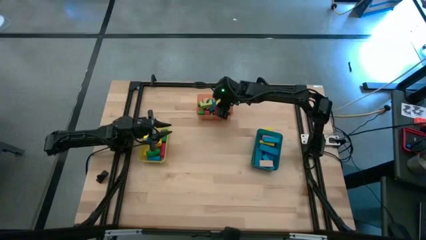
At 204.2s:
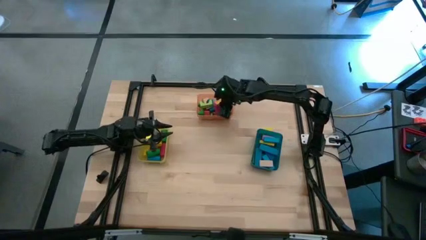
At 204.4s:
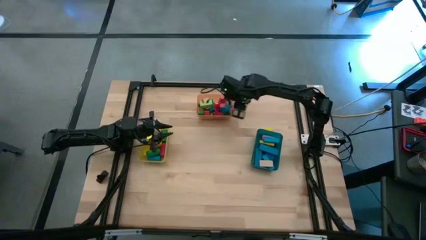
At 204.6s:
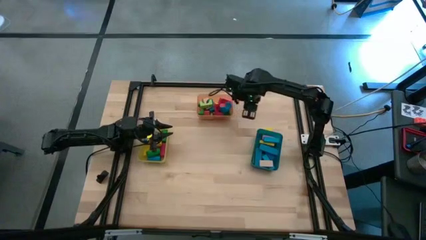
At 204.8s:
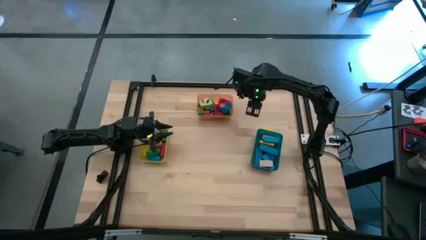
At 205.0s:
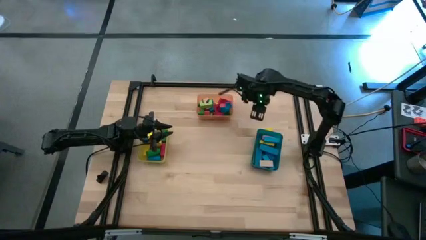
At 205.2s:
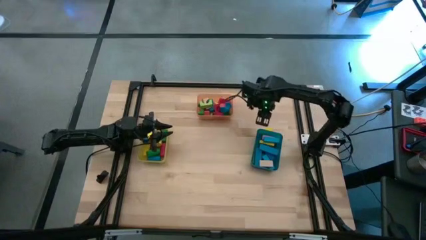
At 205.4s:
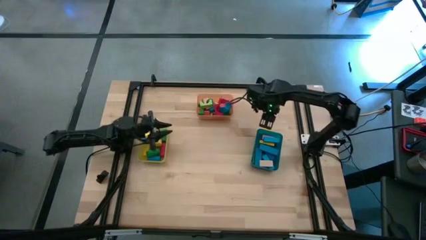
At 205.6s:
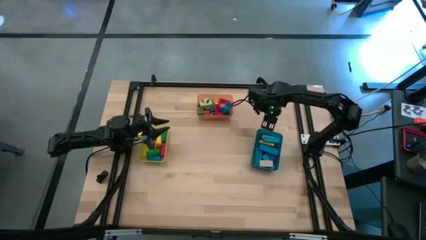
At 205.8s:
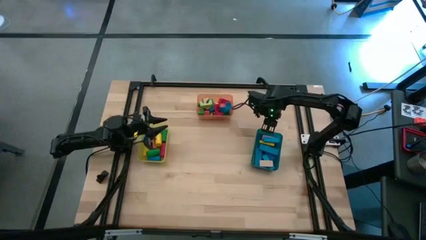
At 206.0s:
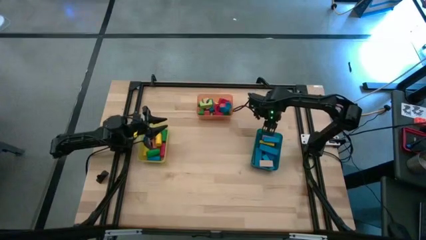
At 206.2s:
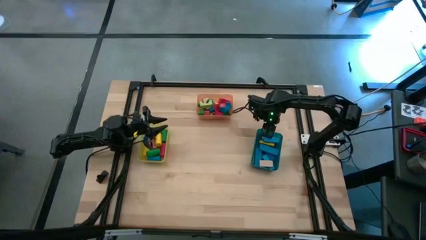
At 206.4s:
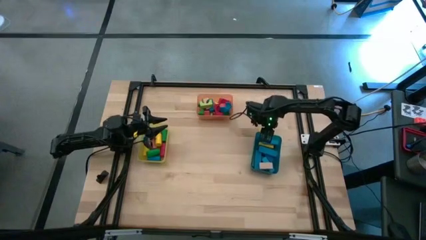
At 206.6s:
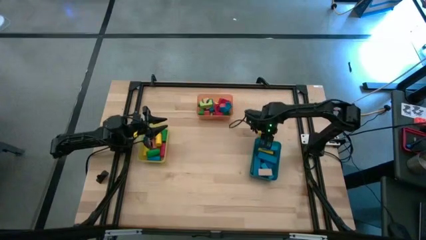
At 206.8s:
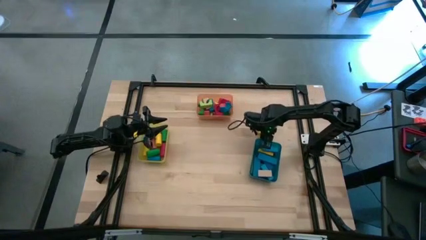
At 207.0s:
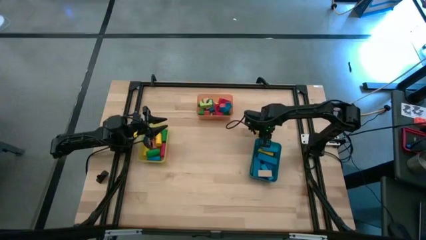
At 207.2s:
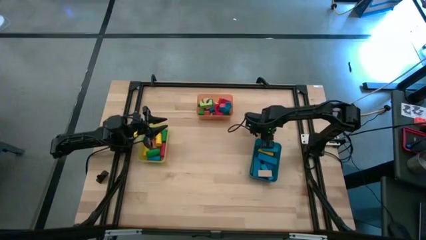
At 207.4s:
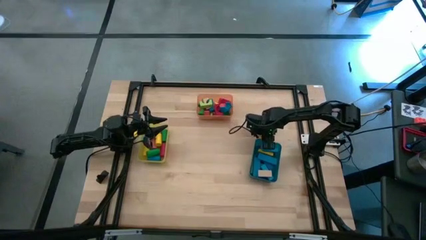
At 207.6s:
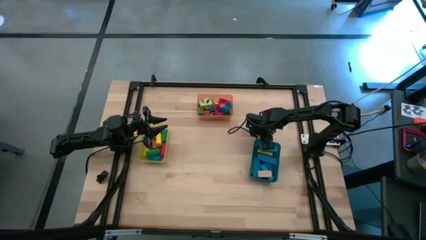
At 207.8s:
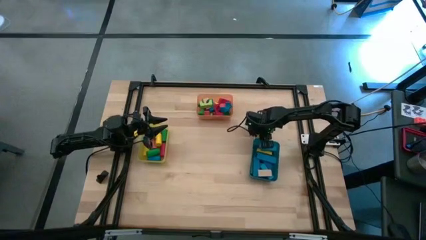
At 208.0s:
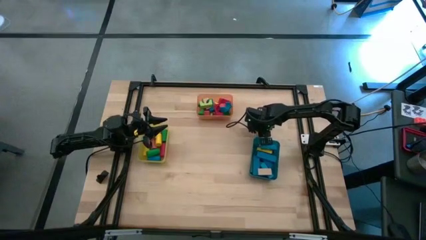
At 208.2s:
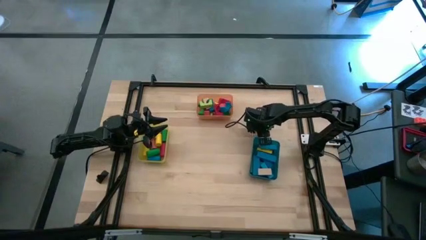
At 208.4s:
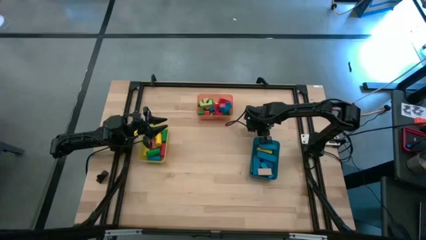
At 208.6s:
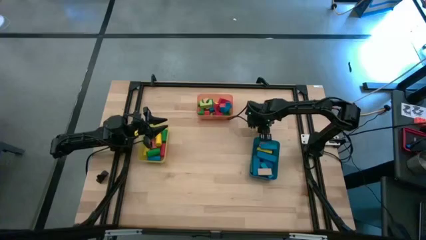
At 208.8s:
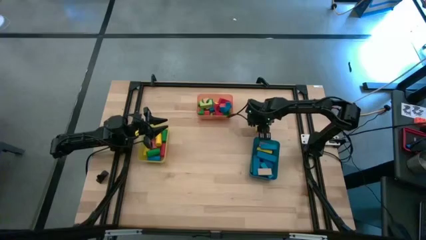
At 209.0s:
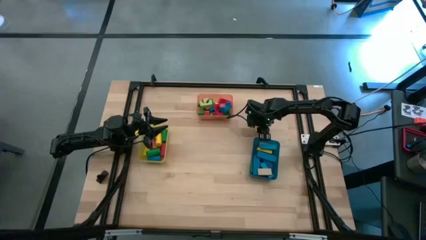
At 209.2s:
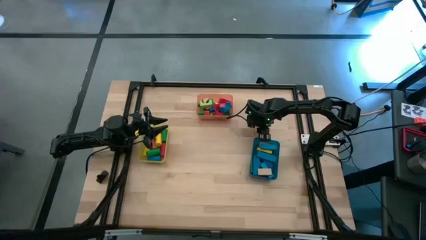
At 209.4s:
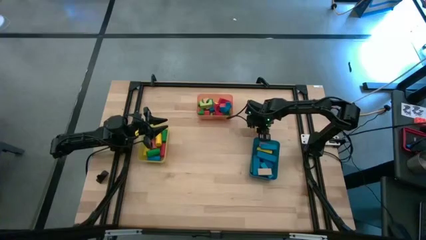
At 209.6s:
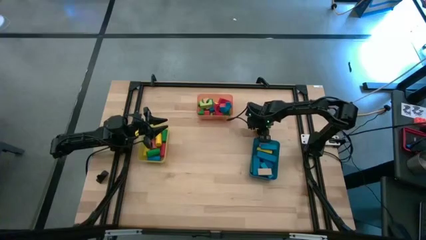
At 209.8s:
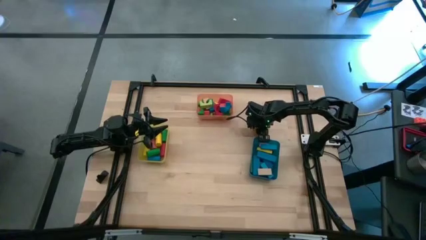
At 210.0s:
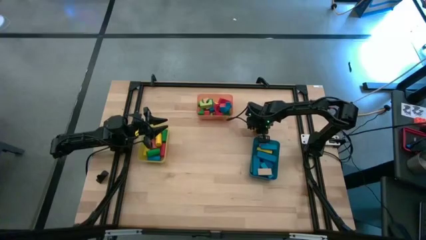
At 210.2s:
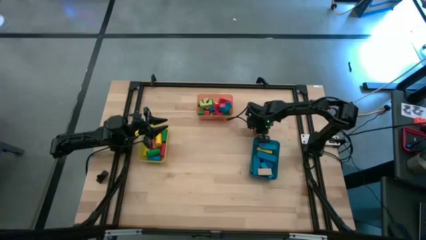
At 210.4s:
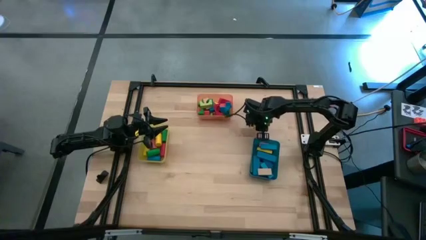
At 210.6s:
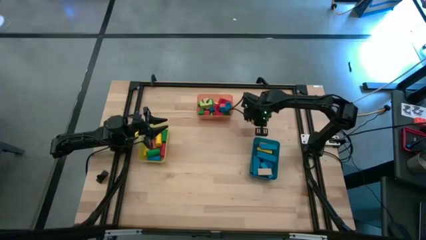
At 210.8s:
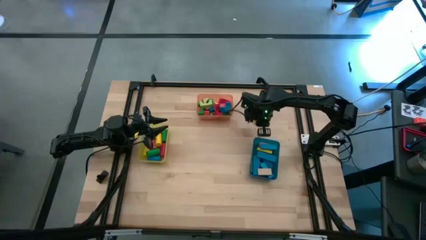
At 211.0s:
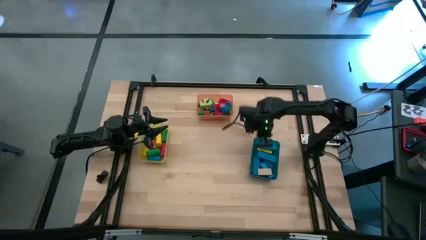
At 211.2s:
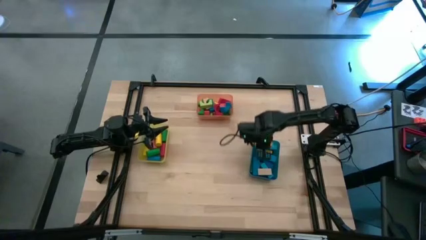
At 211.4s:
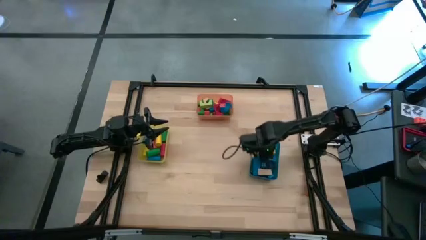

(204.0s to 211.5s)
Task: Sort blocks by size
Put the yellow rectangle block into the blue bin

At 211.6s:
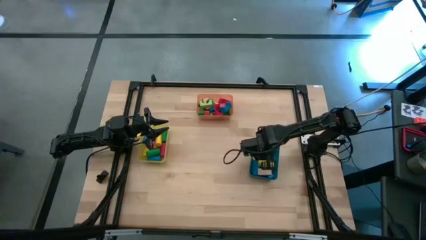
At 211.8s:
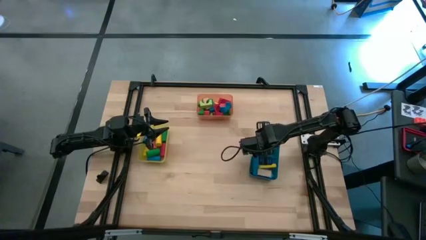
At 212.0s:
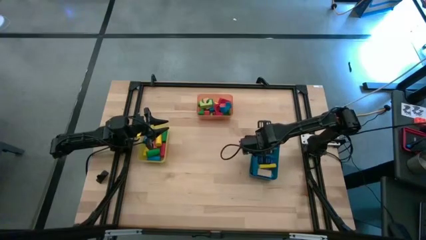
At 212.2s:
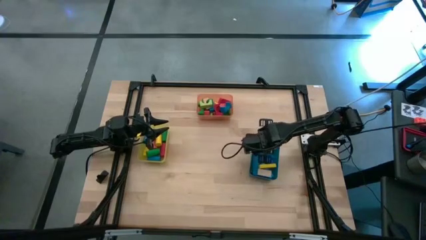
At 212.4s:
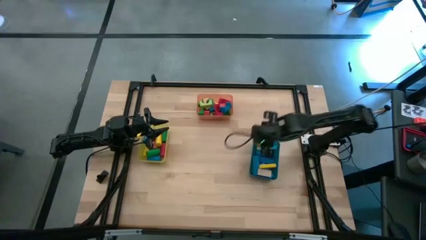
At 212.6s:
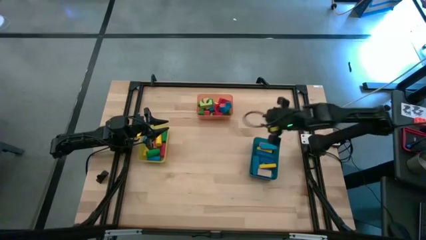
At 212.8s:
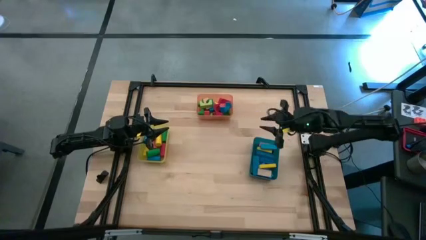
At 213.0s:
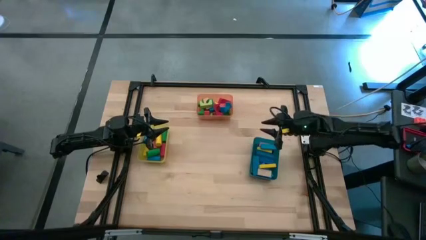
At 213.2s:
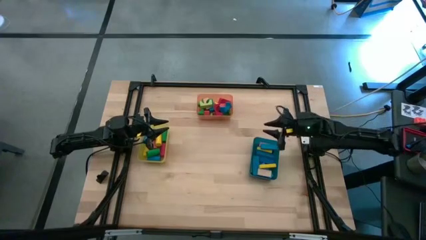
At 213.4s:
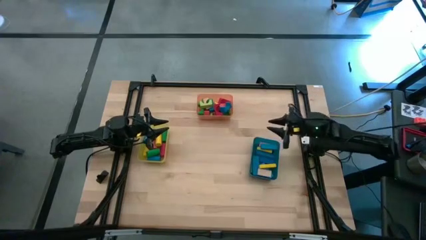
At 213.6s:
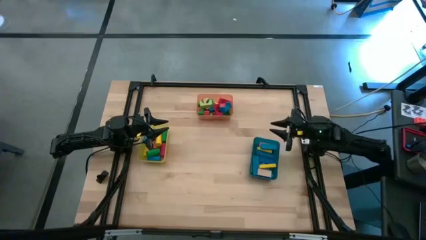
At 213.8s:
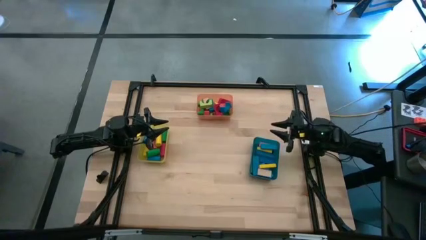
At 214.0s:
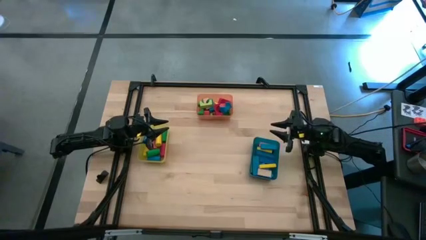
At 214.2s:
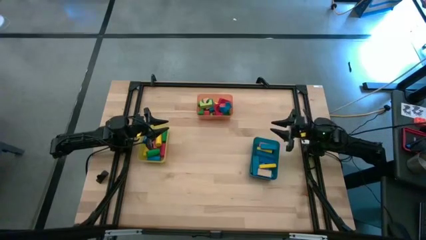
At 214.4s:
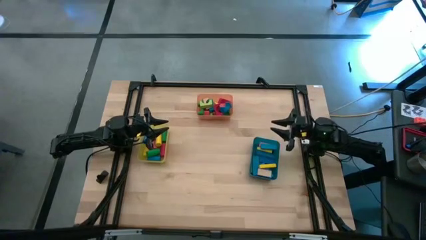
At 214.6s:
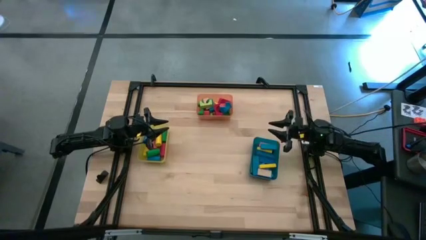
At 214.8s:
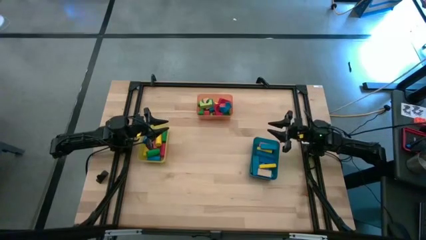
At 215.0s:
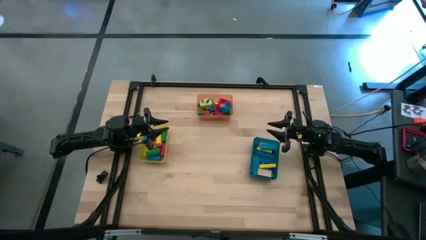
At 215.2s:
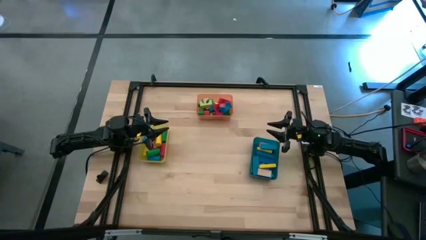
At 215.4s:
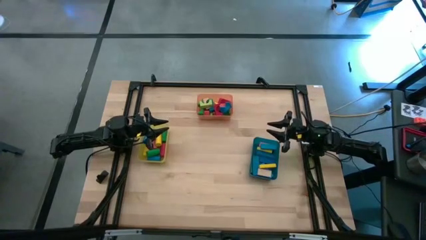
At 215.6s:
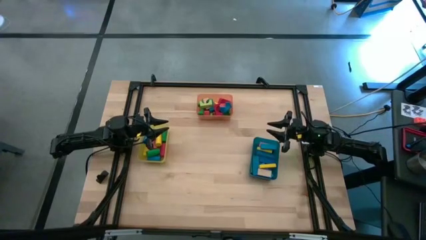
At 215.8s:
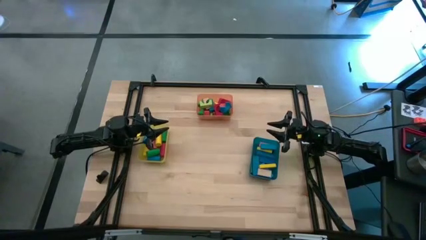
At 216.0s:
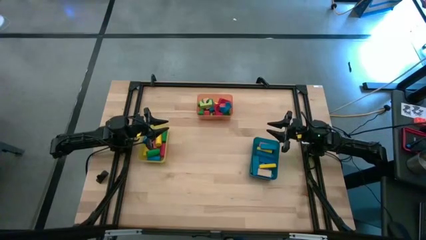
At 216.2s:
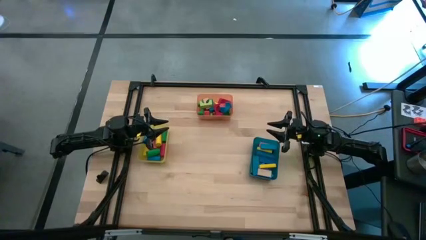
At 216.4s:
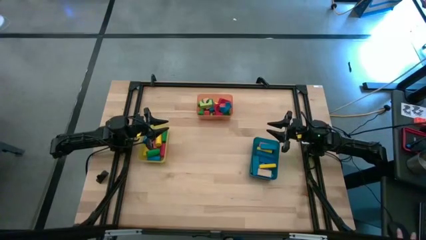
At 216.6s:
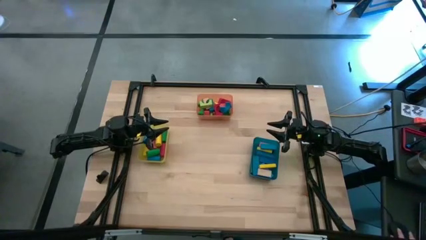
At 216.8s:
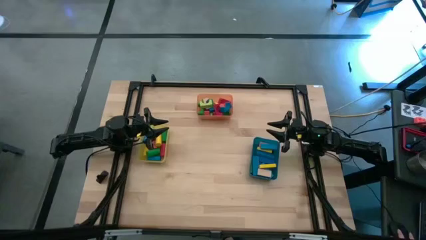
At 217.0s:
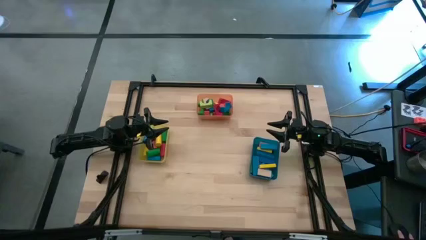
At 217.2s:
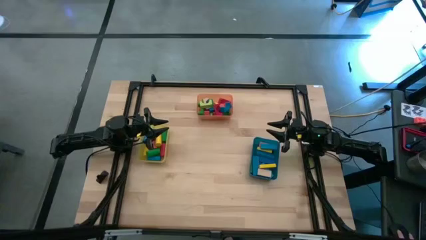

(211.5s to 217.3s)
Return to Home Position

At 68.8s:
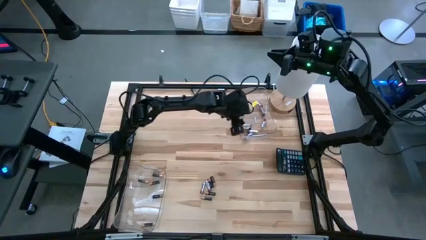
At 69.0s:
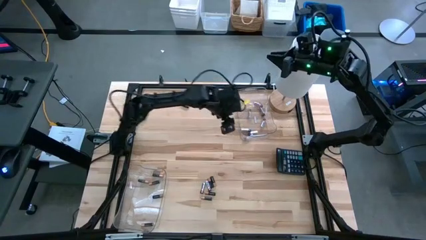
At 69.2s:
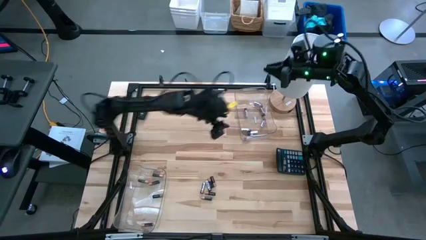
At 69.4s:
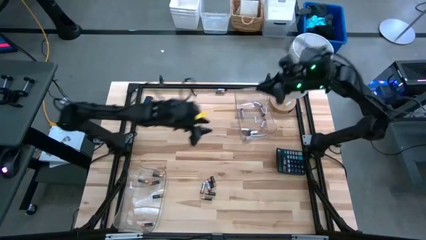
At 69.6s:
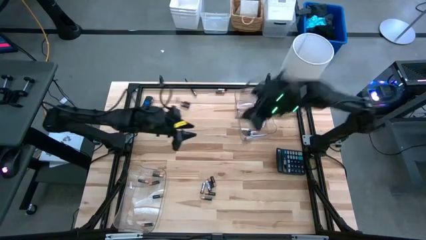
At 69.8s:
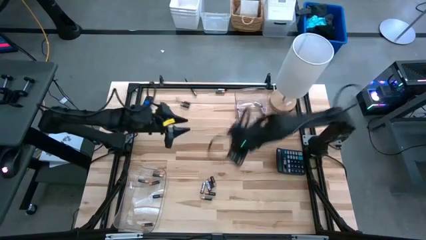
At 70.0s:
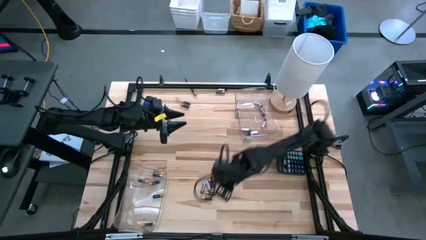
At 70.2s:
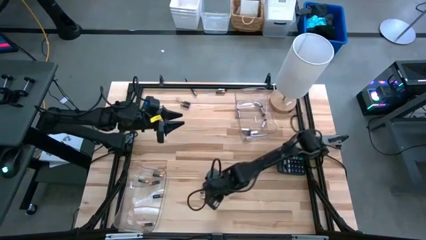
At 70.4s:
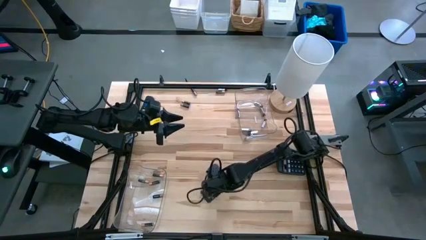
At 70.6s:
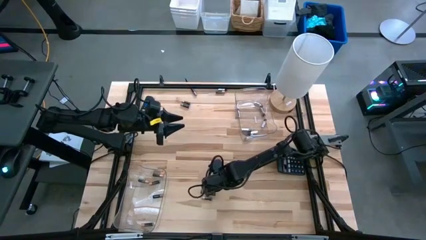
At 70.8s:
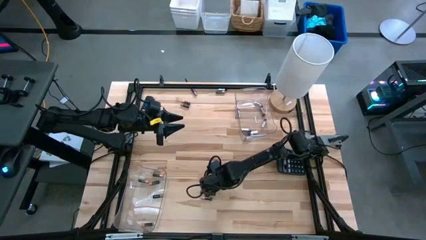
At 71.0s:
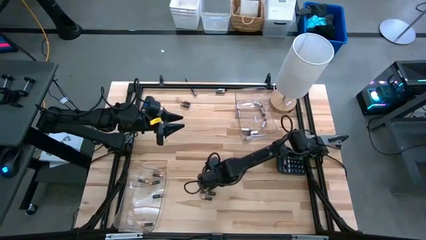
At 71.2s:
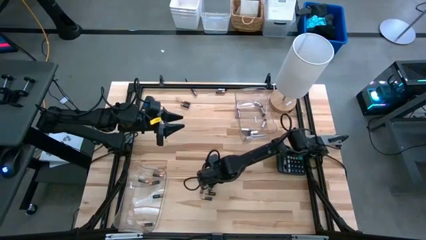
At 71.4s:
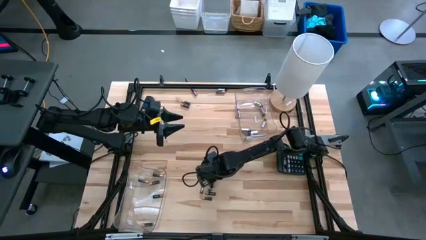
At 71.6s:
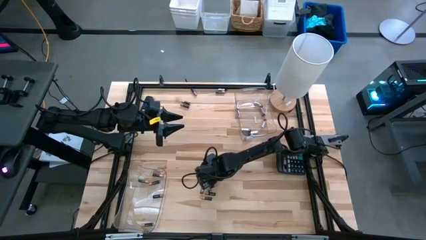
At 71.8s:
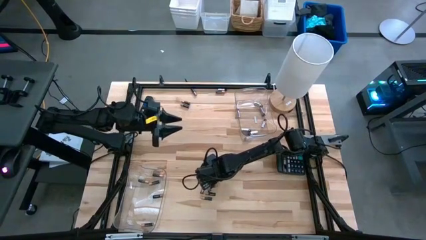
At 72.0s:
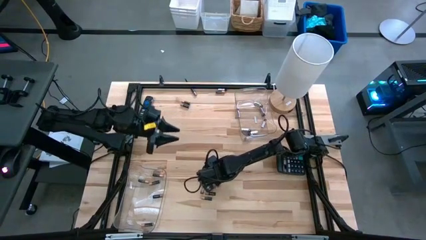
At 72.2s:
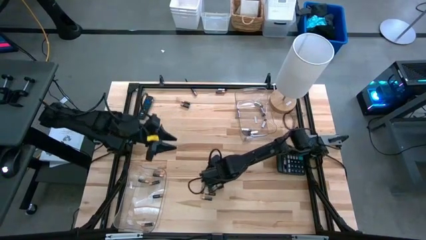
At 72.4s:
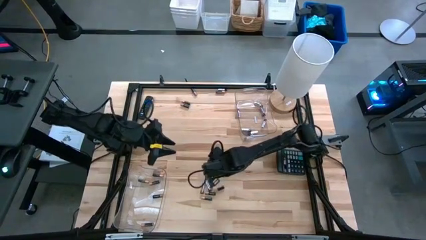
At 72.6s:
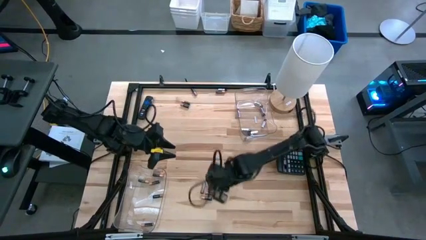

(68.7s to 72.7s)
Task: Sort batteries
Put the brown battery into the left transparent bin
